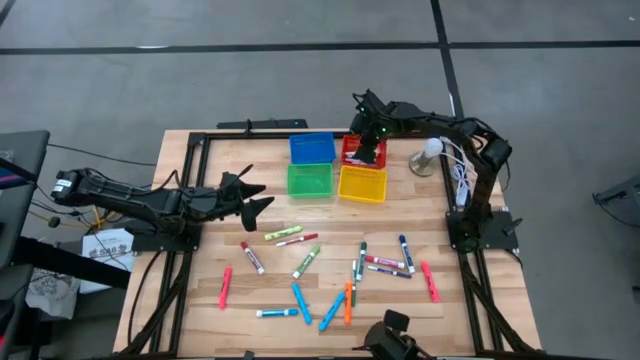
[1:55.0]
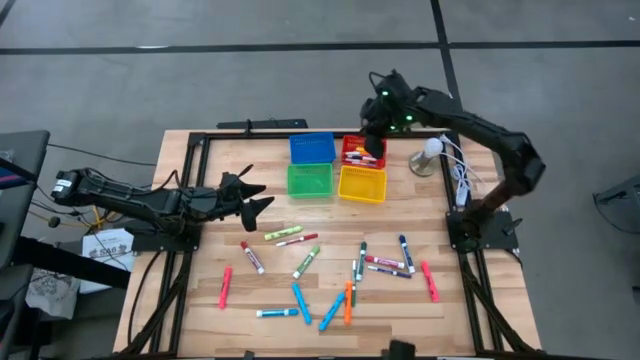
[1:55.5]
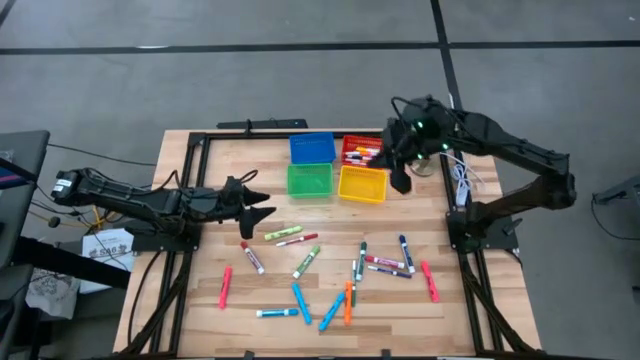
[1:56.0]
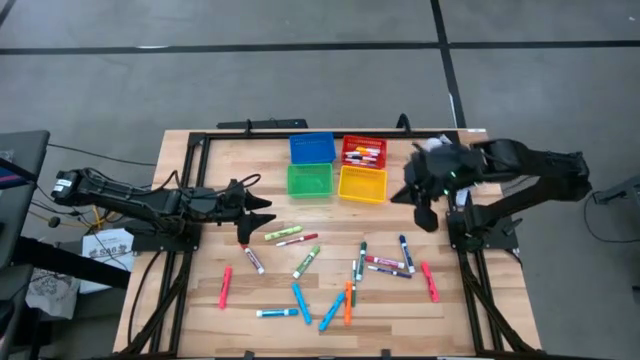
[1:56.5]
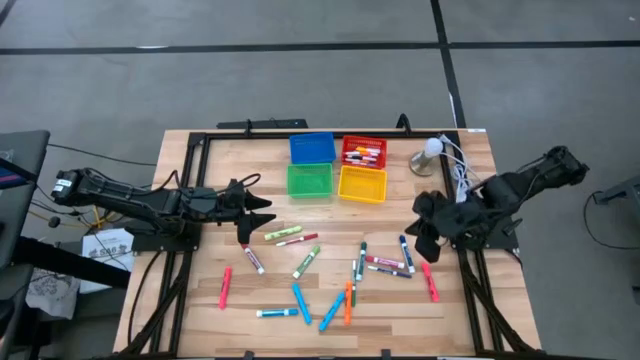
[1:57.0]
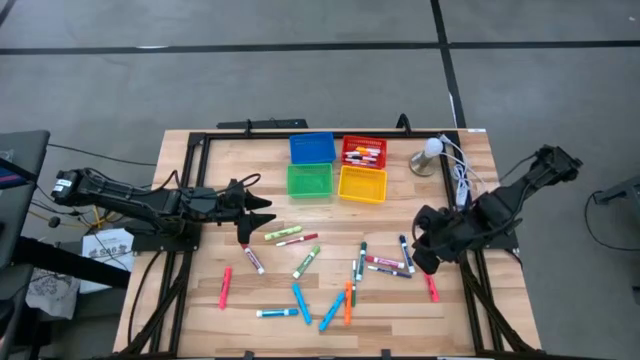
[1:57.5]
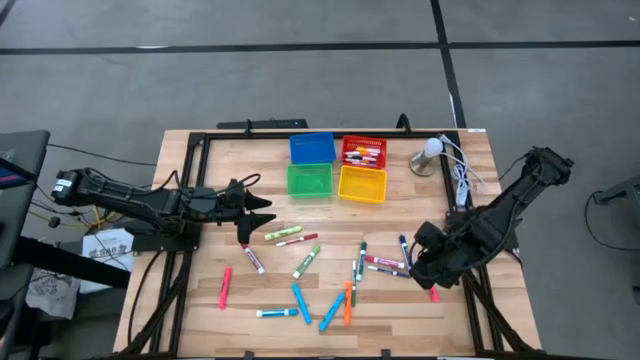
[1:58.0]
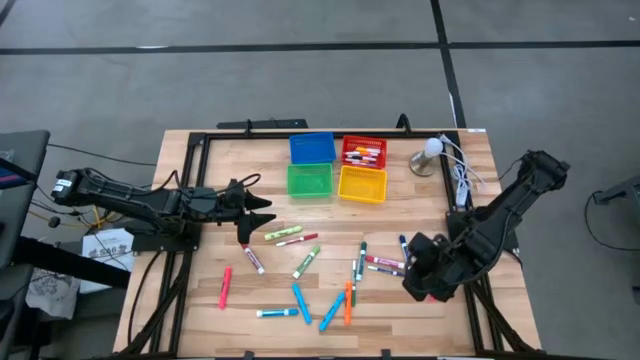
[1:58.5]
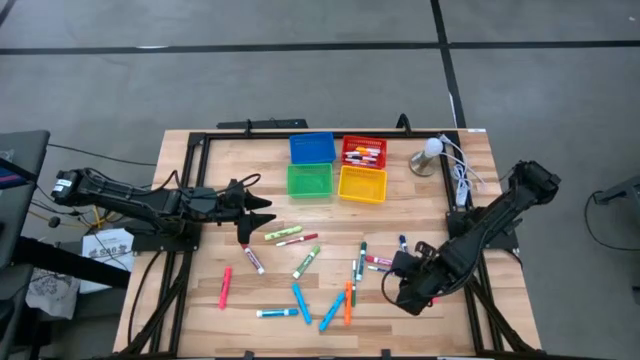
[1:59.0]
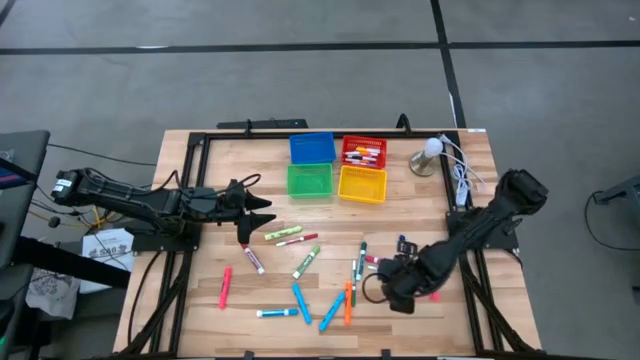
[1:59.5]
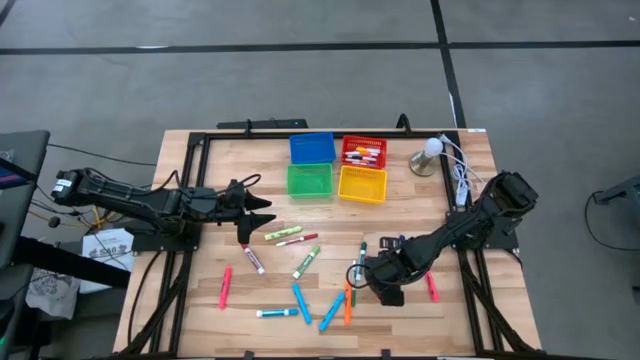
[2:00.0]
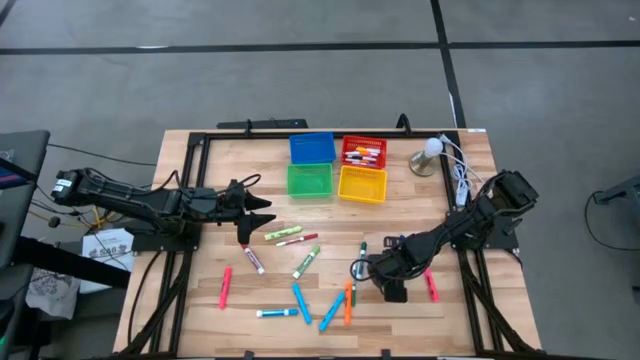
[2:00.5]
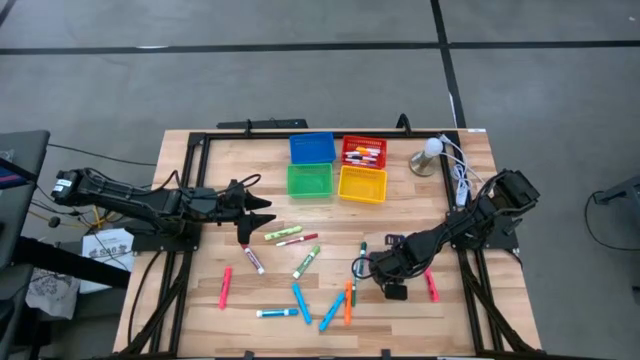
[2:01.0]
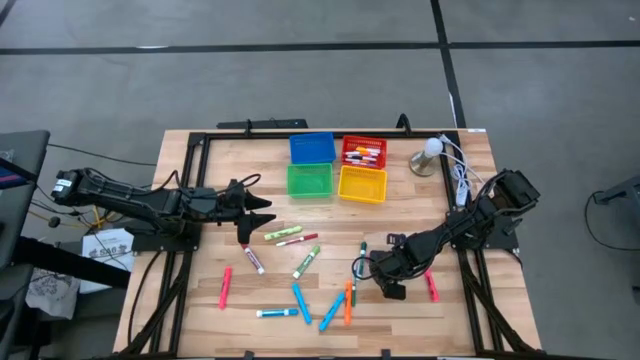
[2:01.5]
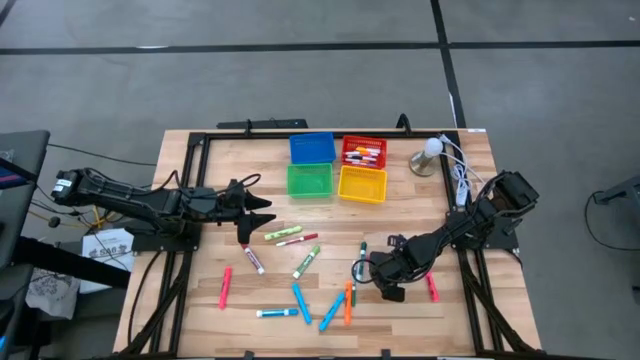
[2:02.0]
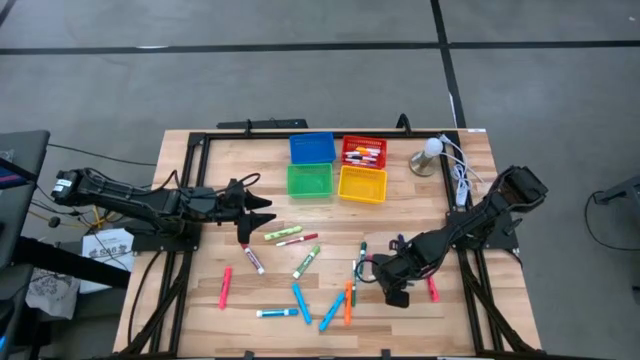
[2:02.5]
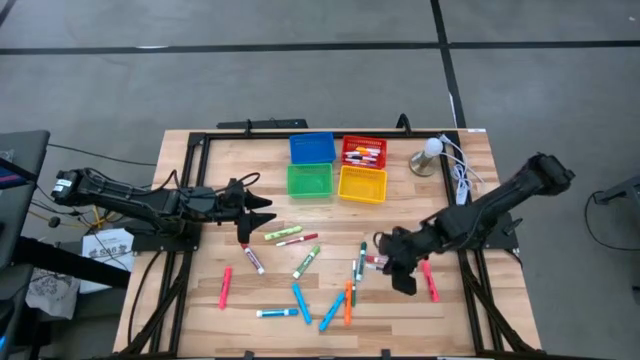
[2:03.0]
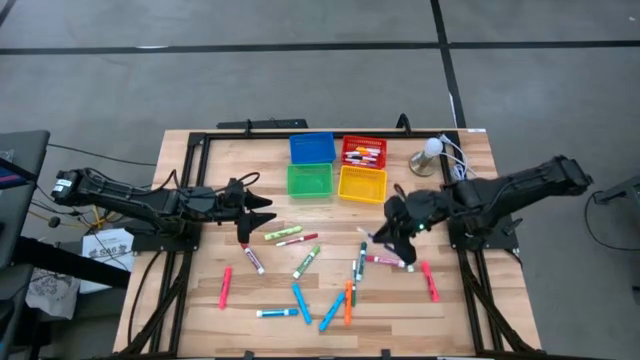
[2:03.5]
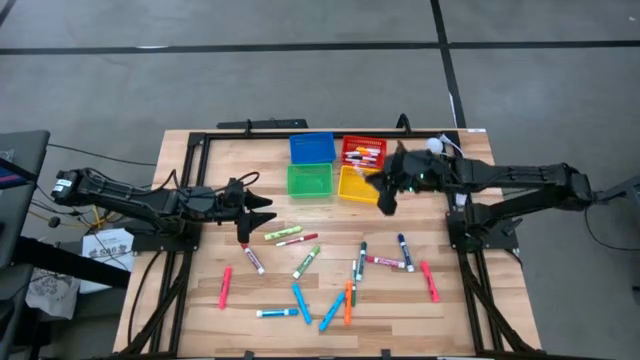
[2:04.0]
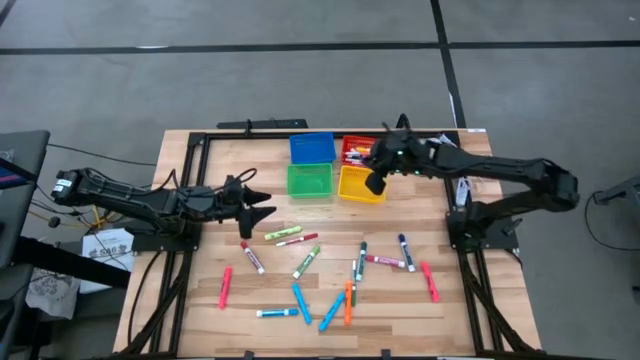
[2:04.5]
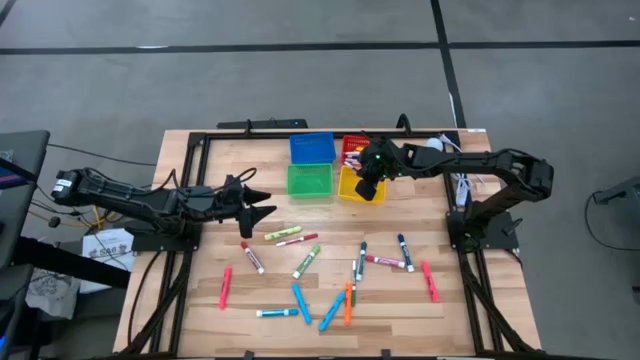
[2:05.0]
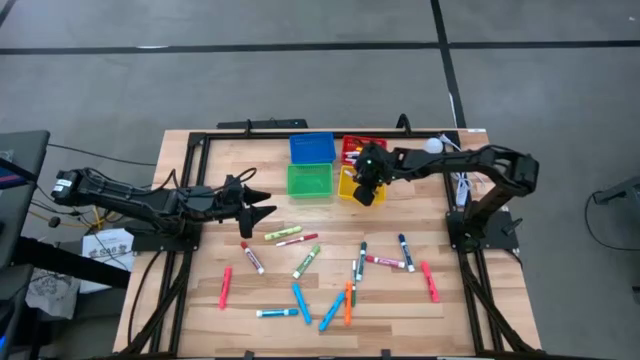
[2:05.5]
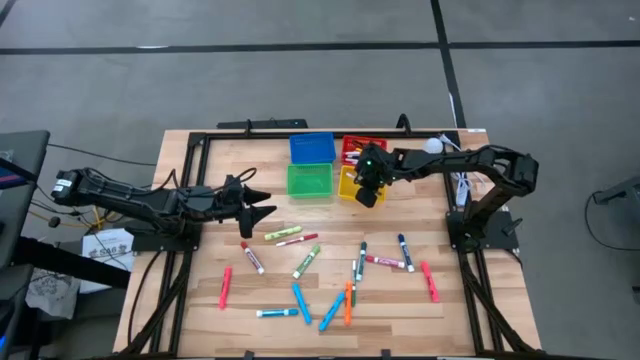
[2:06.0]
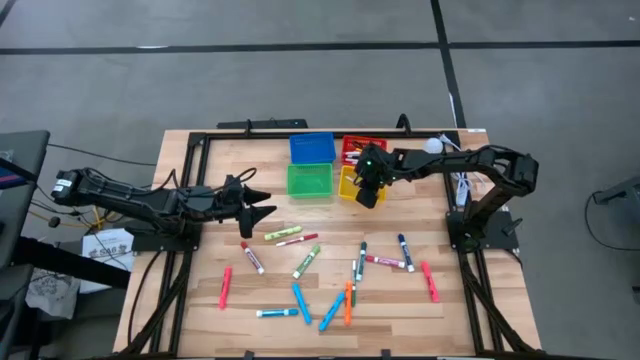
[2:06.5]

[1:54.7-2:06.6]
Task: Pick & Place Markers
Put the dark blue marker into the yellow bin

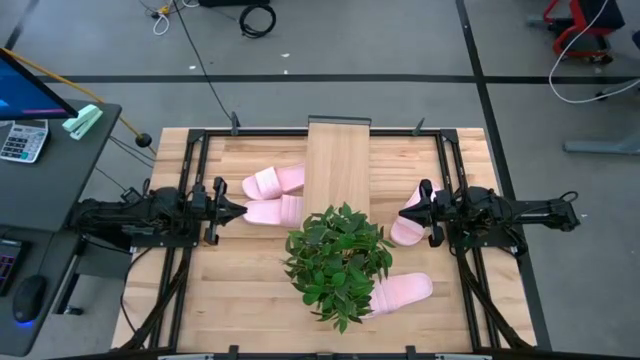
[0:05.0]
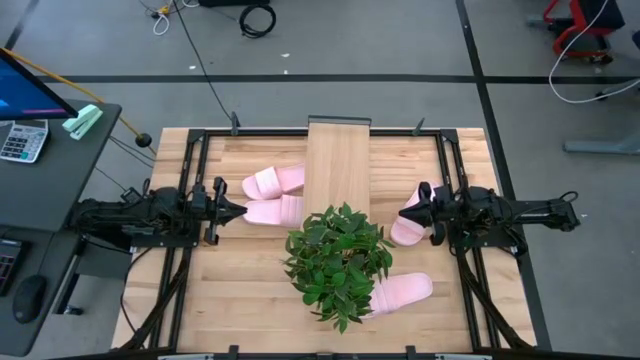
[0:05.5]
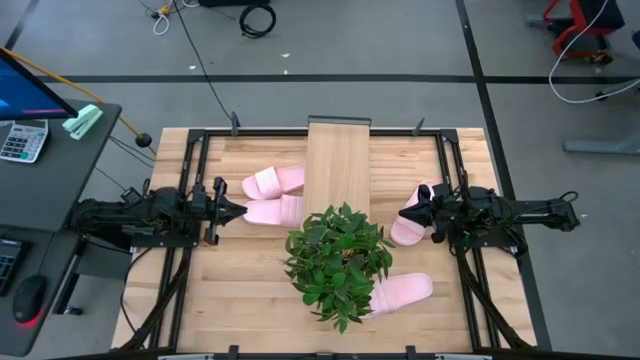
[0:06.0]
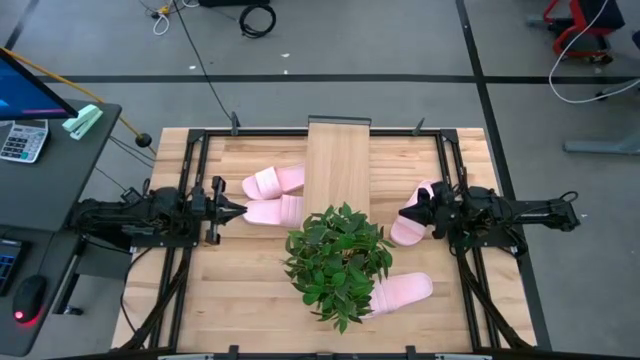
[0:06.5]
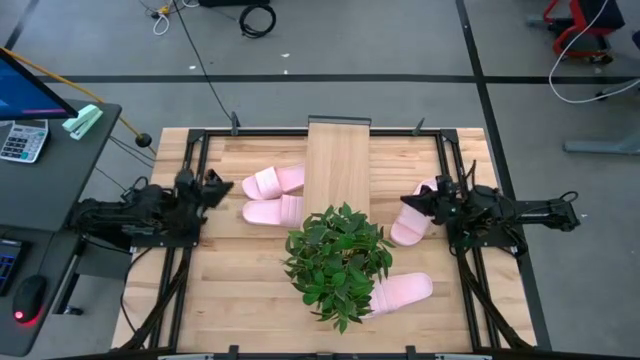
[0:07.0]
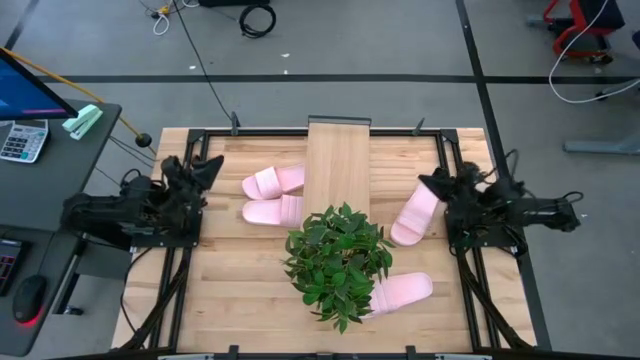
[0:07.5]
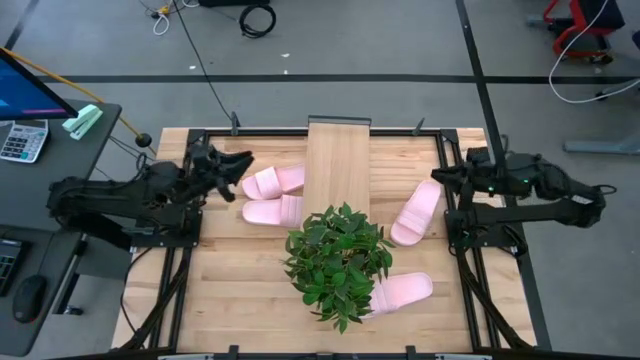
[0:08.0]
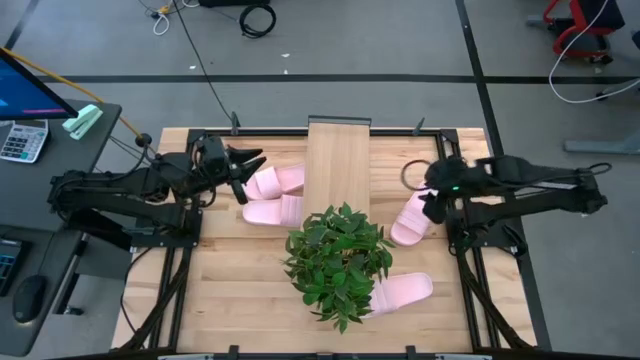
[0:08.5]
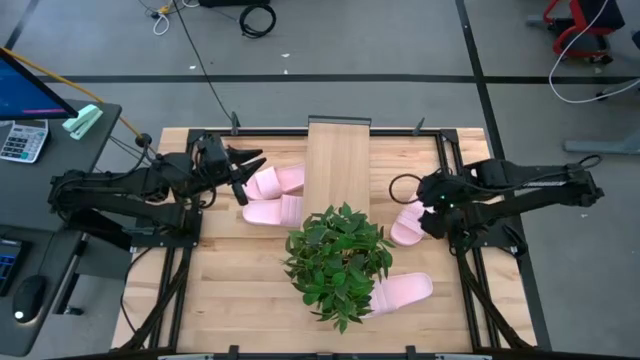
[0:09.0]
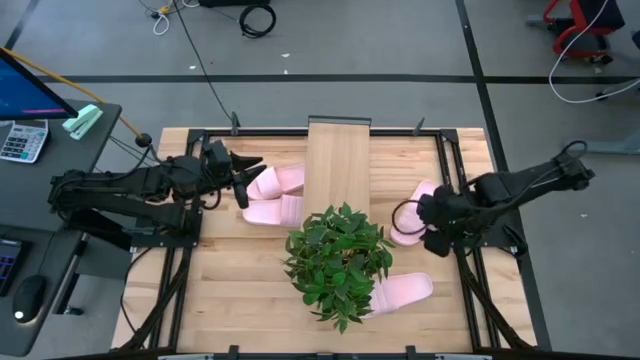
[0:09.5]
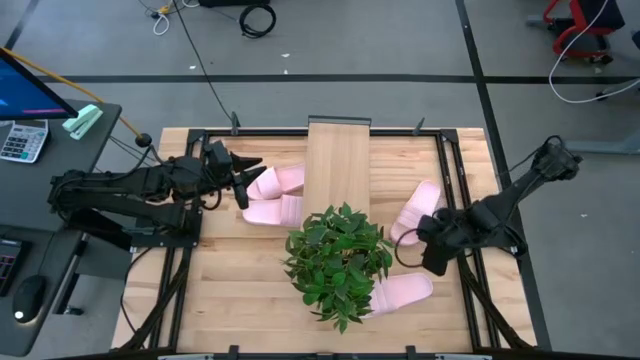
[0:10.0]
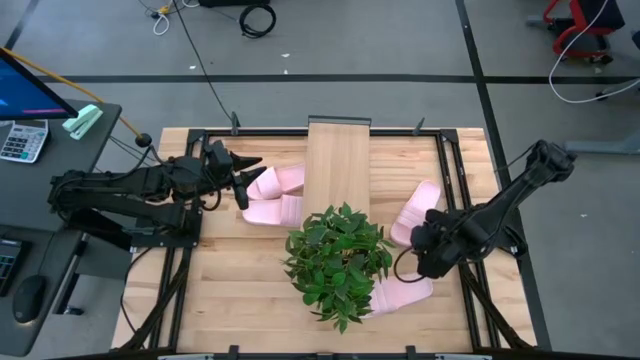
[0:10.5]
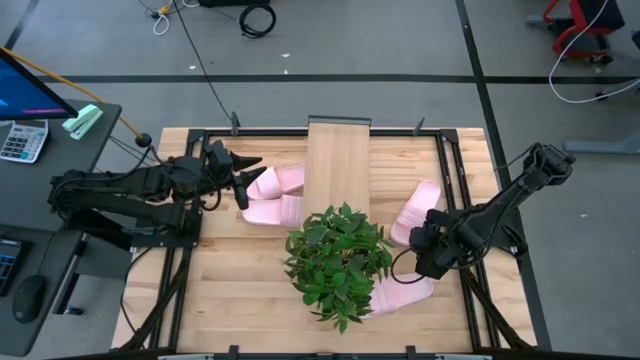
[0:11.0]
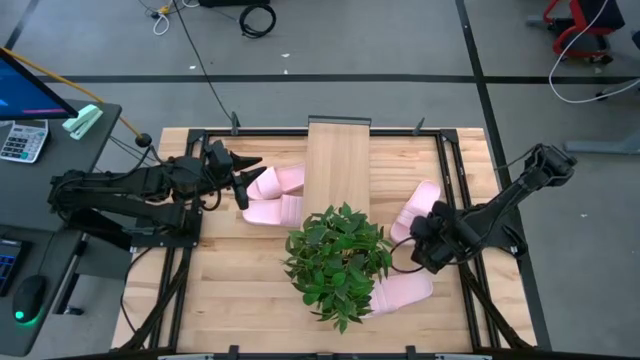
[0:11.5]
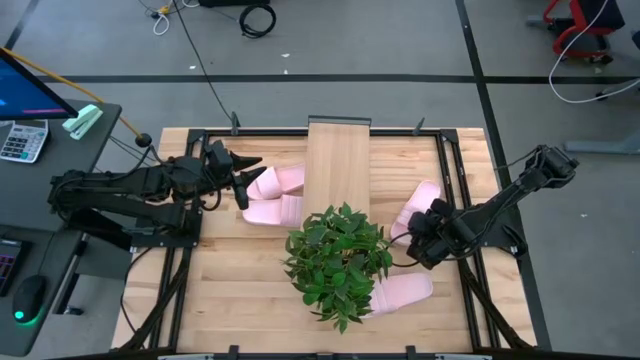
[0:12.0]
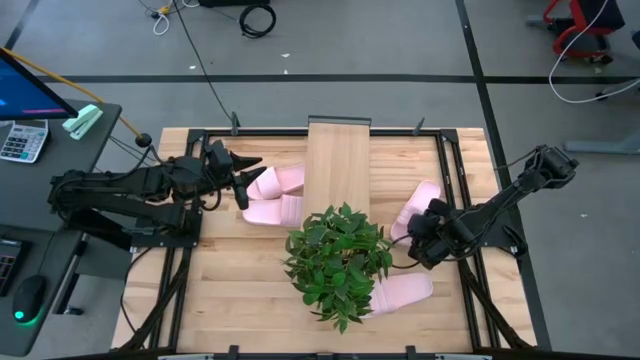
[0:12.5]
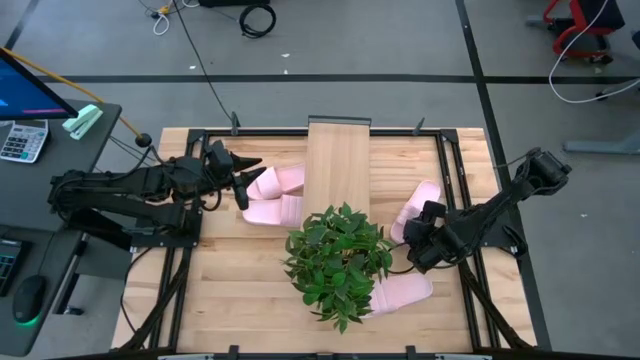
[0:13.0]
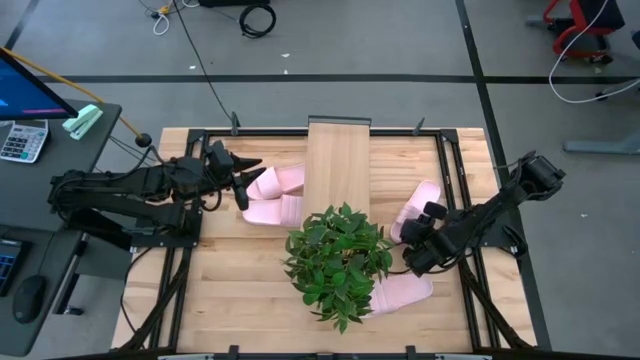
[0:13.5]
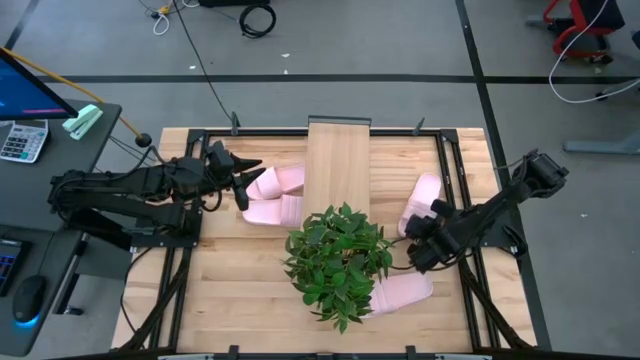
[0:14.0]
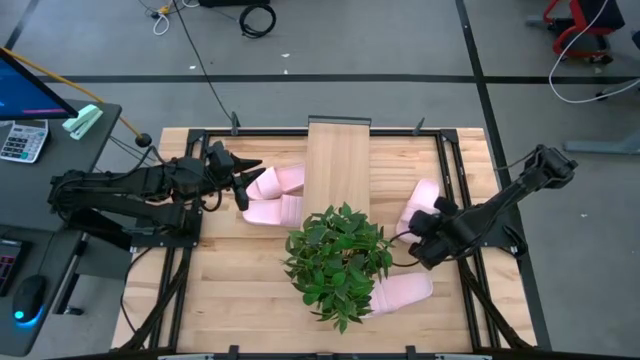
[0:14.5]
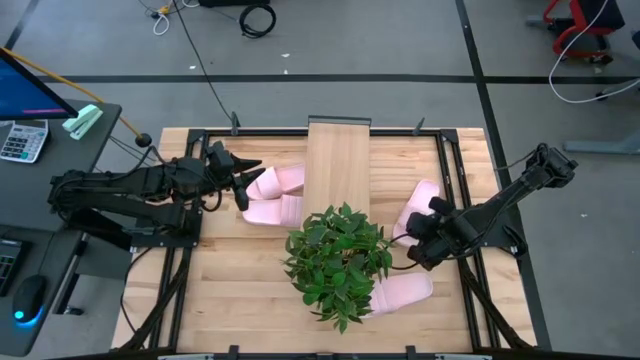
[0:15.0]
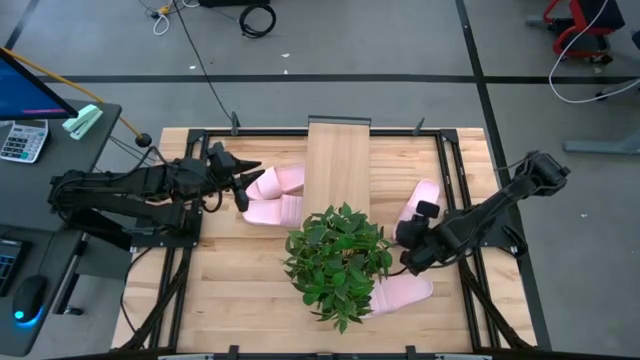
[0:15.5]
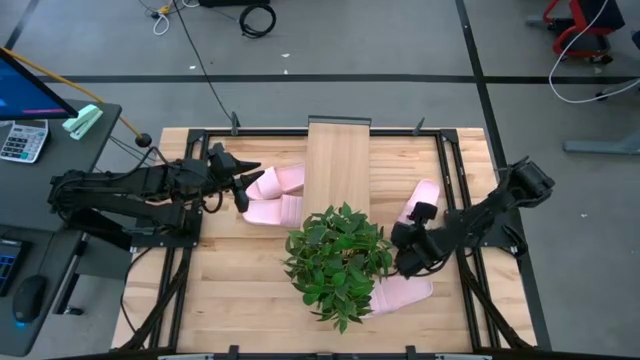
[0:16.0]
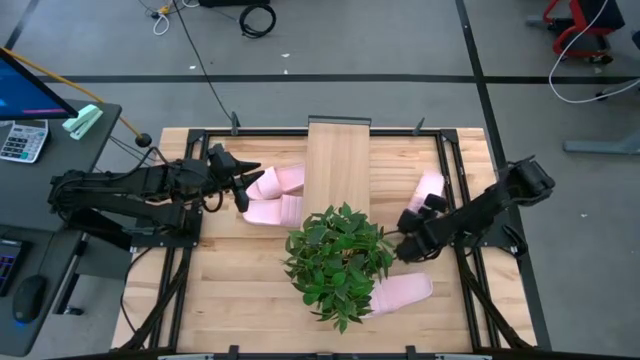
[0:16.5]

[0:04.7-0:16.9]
Task: Pick and place slides into the shelf
Put the pink slide on the shelf
